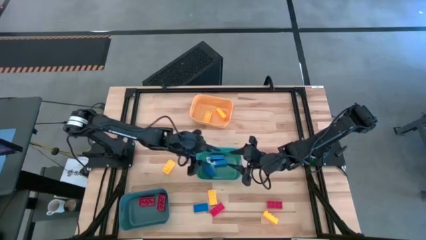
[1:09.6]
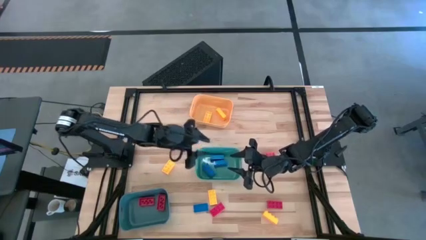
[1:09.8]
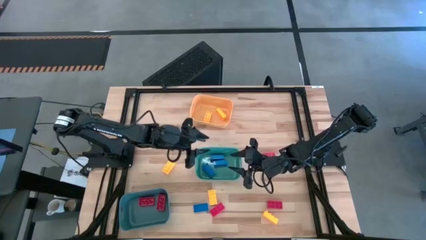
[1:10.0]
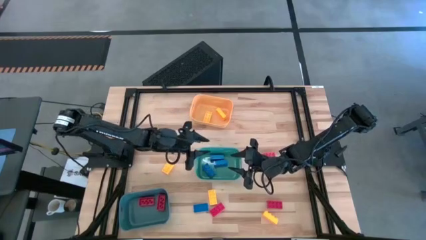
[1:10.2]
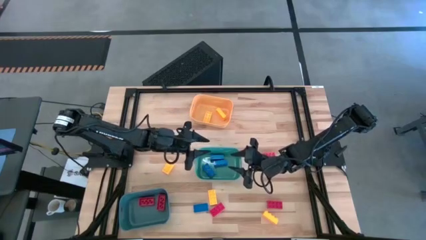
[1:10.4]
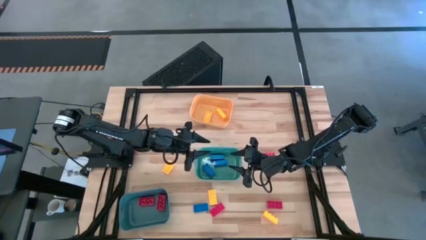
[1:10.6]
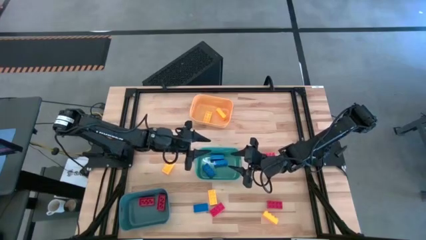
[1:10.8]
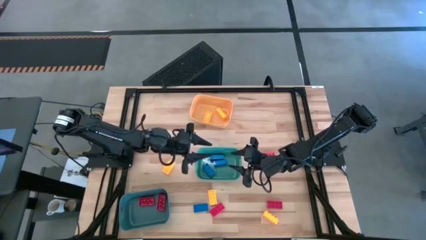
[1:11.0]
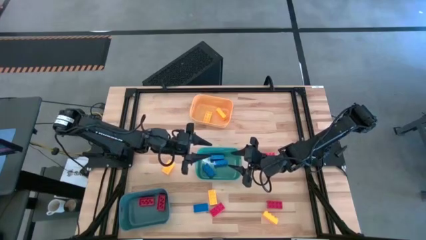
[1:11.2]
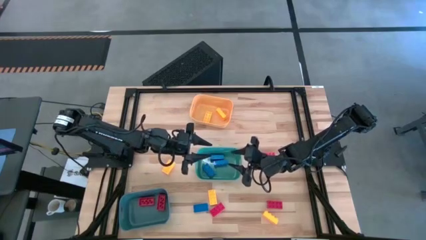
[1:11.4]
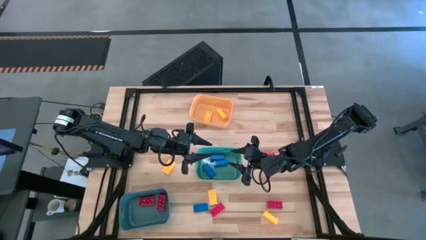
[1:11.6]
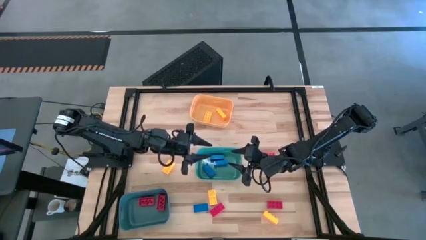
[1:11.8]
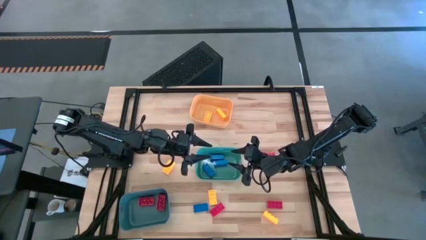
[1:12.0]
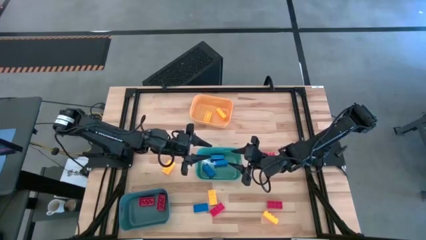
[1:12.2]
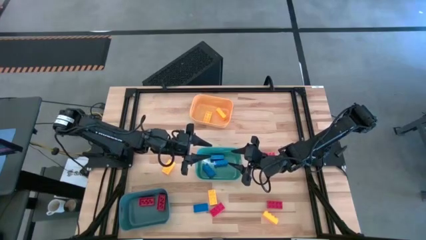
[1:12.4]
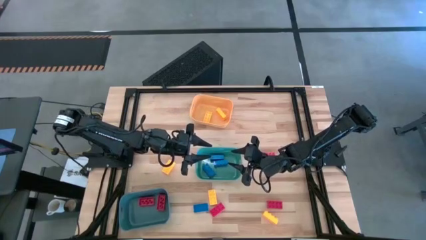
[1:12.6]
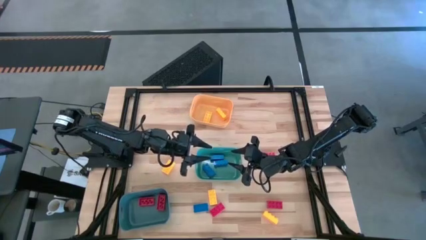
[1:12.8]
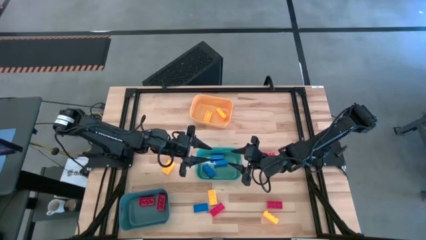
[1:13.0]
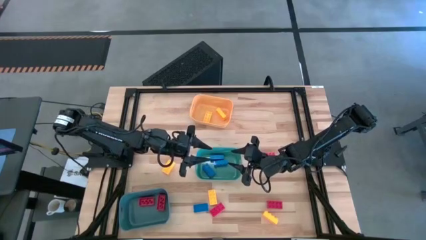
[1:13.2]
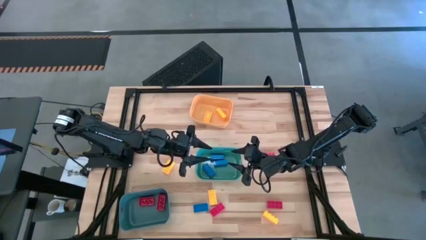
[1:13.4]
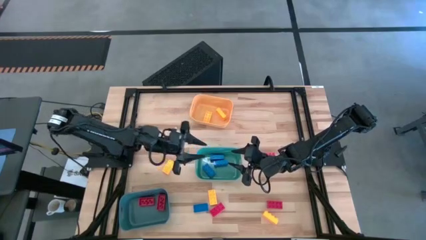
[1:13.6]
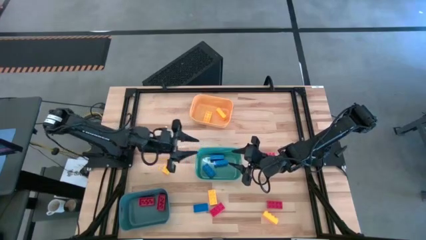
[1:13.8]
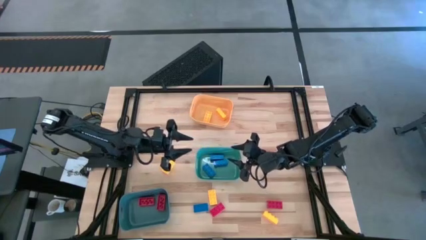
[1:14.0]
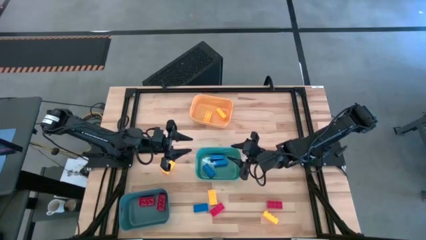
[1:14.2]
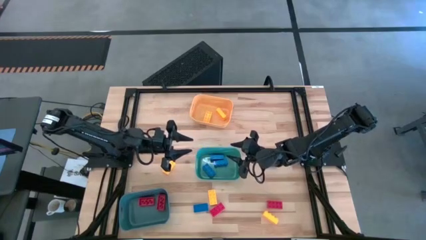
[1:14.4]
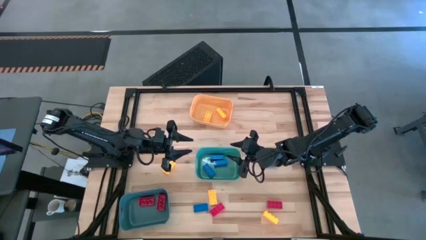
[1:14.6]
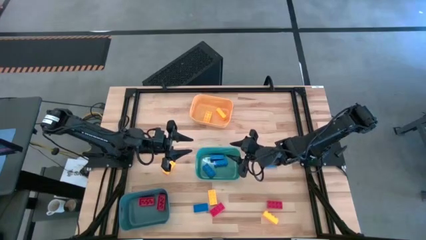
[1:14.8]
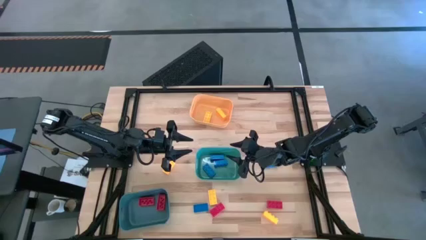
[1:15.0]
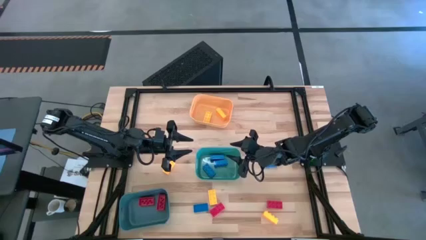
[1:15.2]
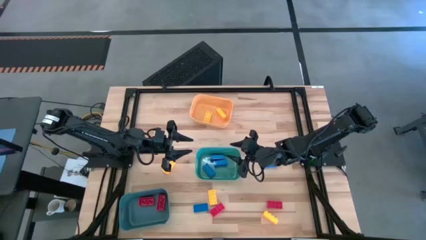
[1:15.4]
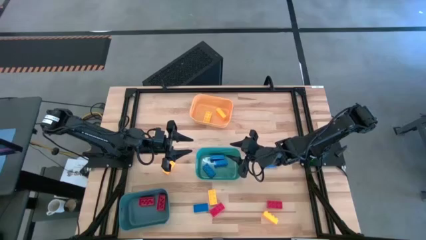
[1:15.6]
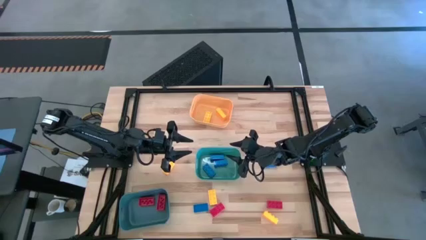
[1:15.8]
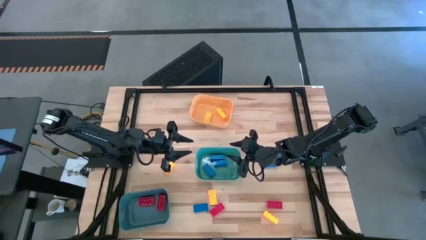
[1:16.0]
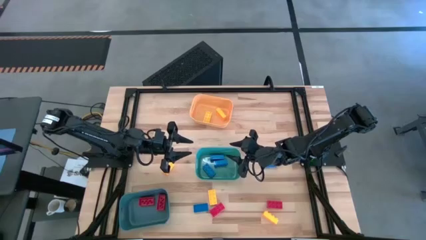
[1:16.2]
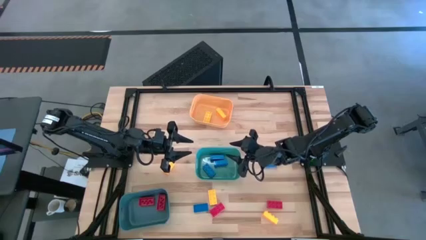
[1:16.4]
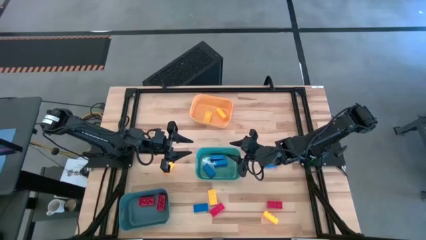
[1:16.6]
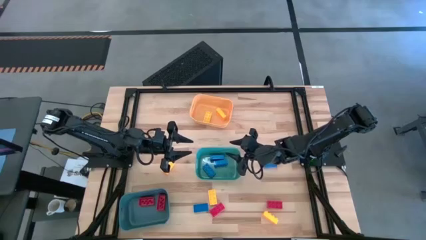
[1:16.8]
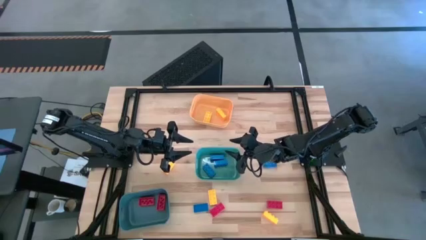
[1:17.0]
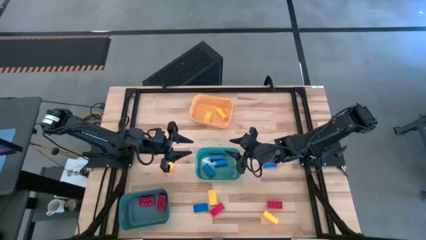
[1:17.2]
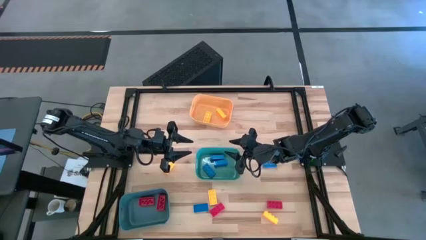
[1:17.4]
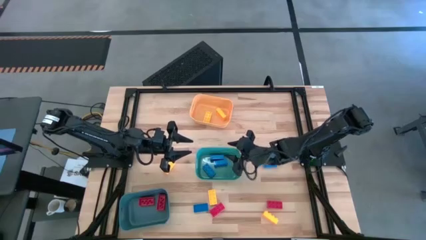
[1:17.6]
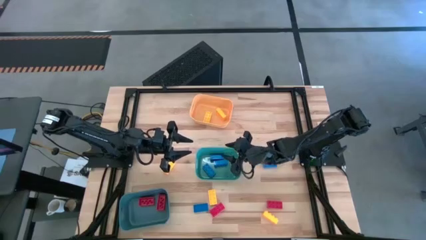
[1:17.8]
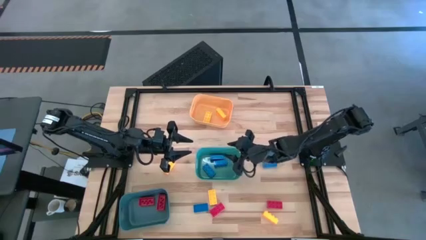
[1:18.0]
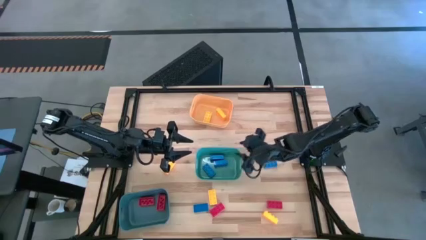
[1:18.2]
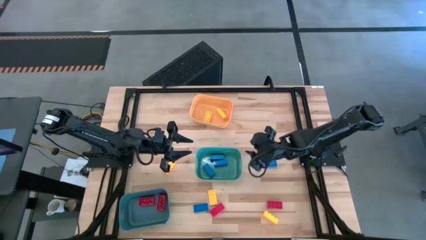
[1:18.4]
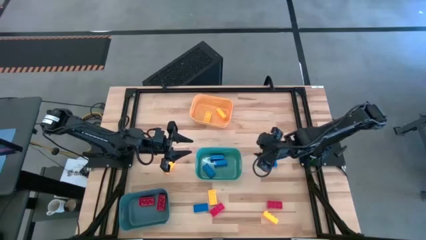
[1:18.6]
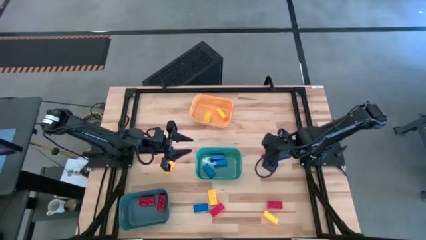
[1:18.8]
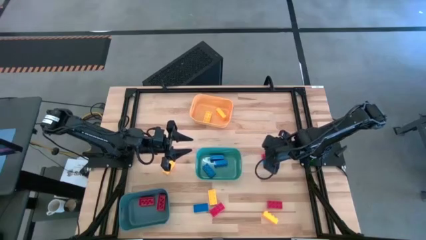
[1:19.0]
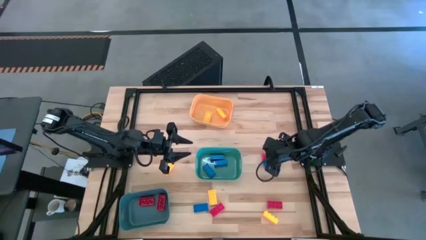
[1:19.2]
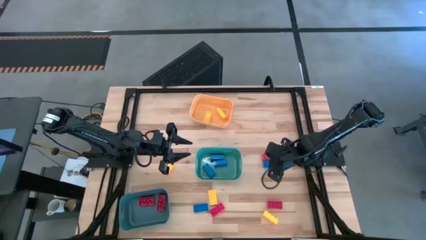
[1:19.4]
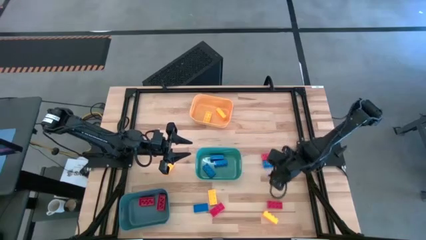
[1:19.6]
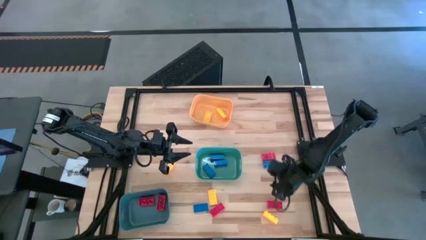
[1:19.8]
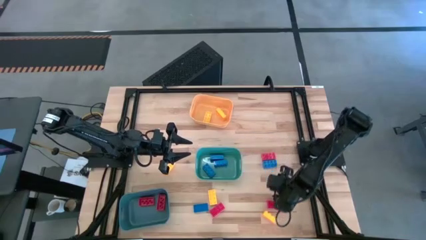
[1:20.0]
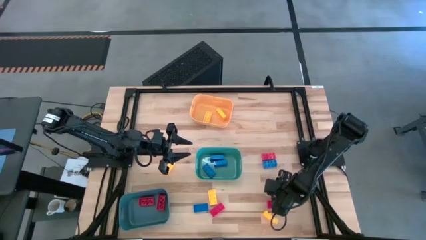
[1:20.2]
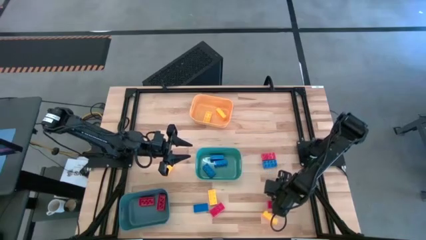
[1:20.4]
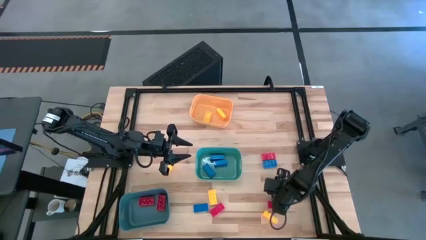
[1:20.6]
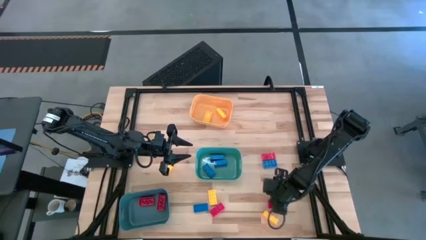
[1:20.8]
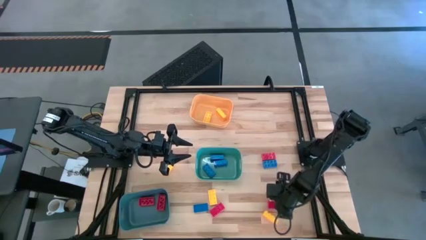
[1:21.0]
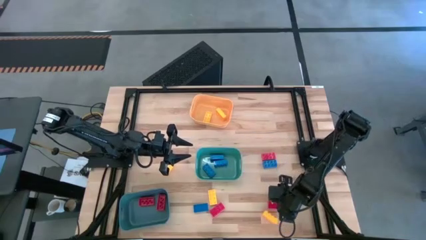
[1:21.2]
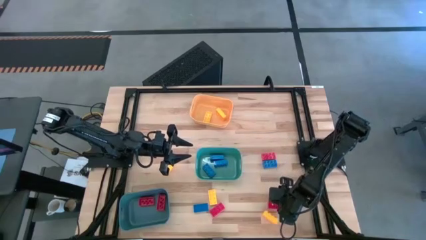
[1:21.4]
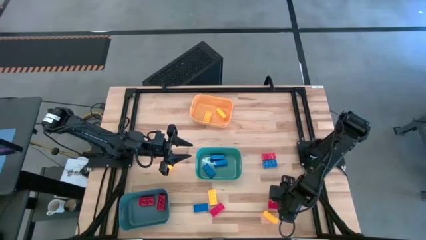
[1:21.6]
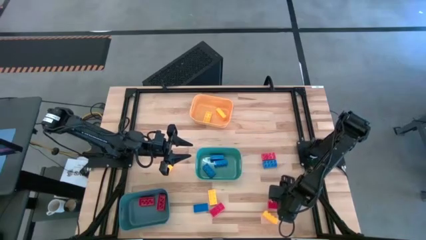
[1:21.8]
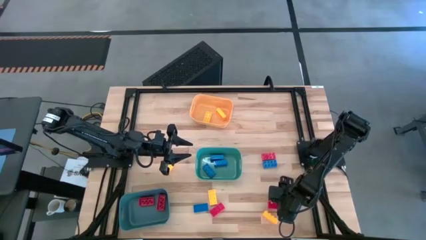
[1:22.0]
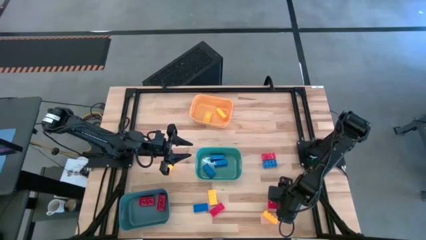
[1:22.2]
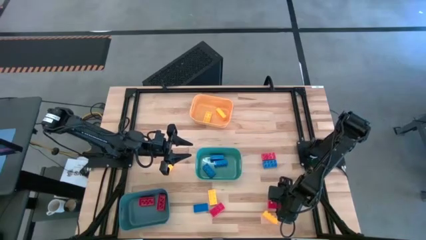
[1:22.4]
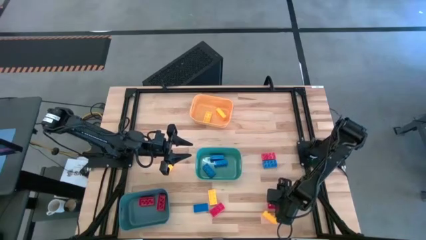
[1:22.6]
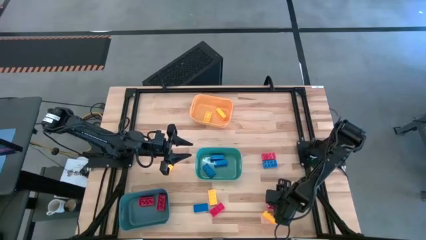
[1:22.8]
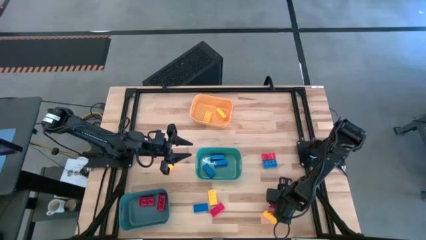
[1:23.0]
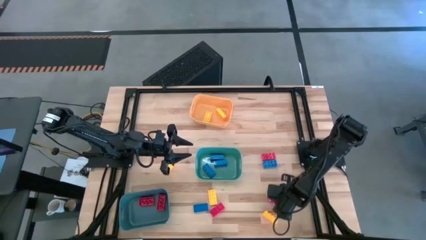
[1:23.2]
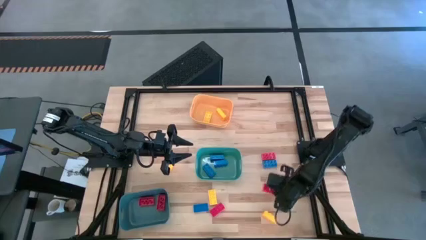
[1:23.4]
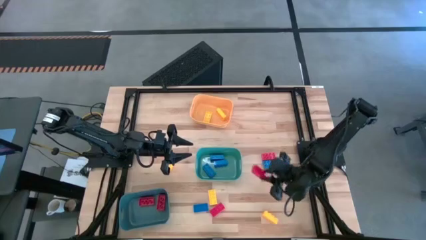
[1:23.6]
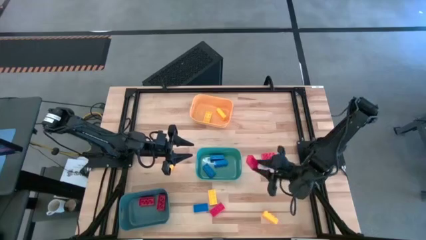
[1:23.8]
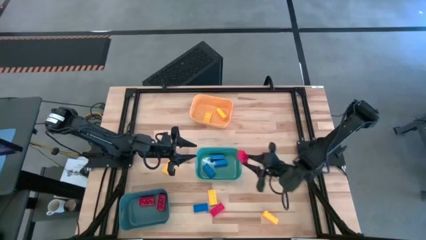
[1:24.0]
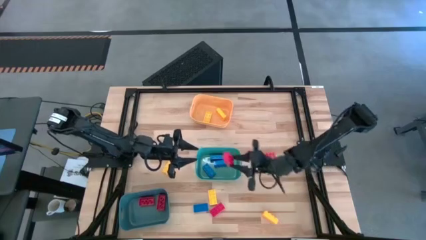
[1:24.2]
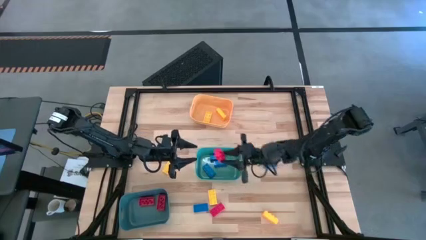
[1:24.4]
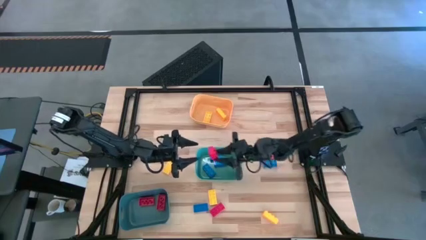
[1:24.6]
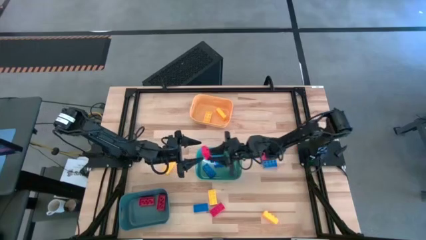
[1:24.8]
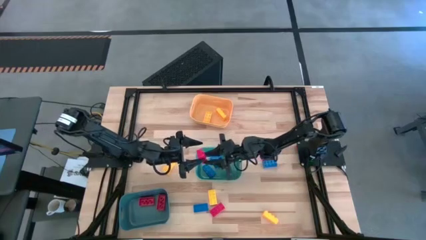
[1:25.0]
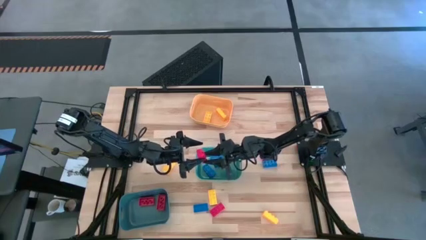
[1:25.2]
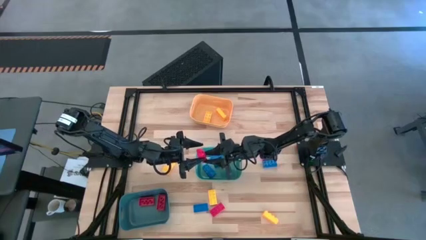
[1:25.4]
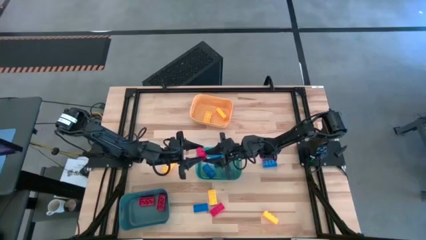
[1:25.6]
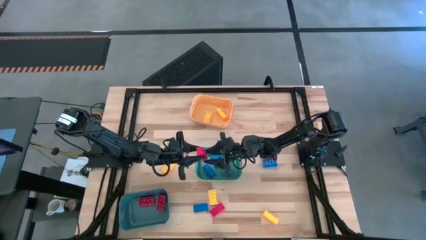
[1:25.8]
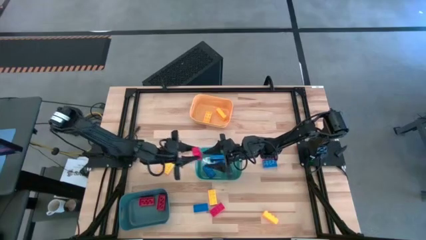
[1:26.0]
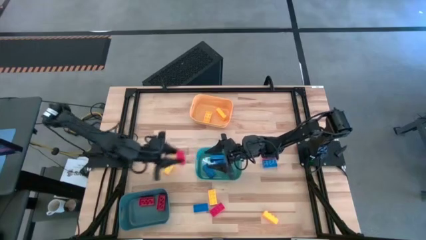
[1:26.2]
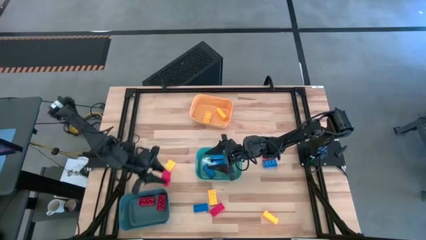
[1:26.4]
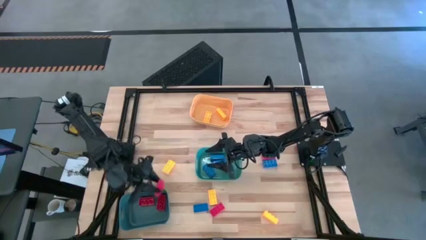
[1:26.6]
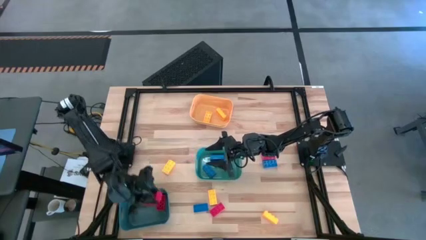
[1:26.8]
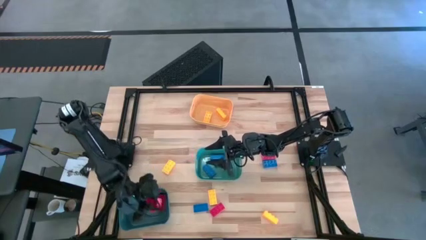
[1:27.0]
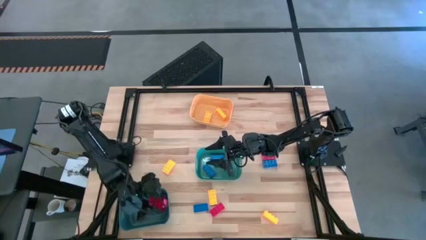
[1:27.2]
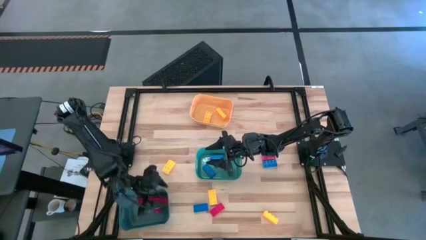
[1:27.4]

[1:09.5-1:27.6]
Task: Sort & place blocks by color
Put the red game piece into the blue bin
